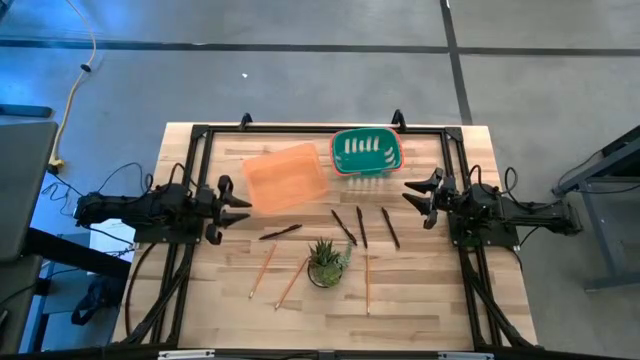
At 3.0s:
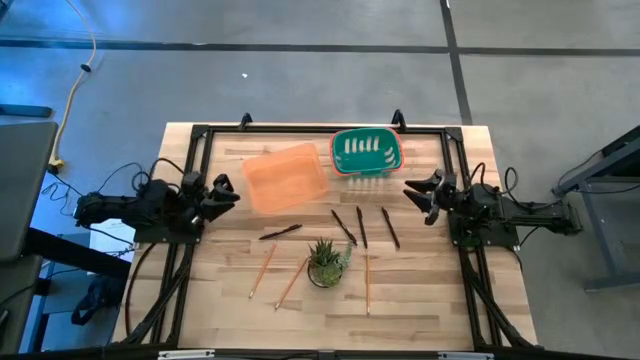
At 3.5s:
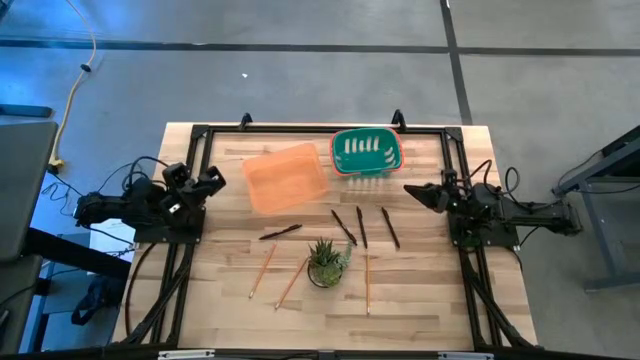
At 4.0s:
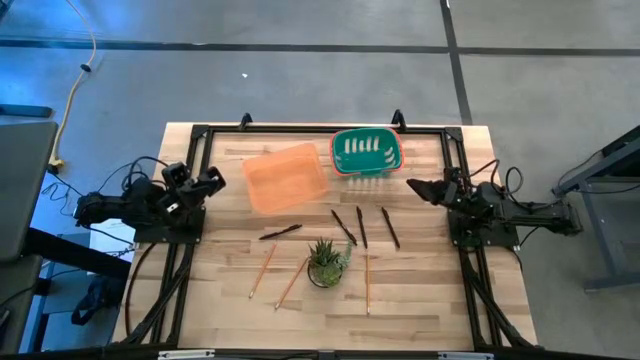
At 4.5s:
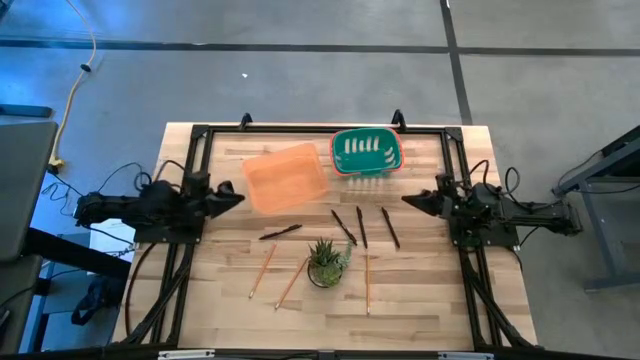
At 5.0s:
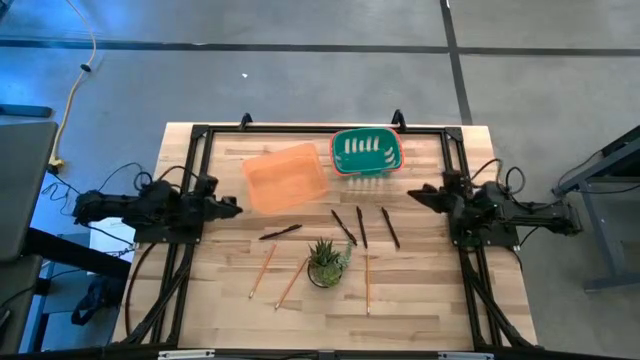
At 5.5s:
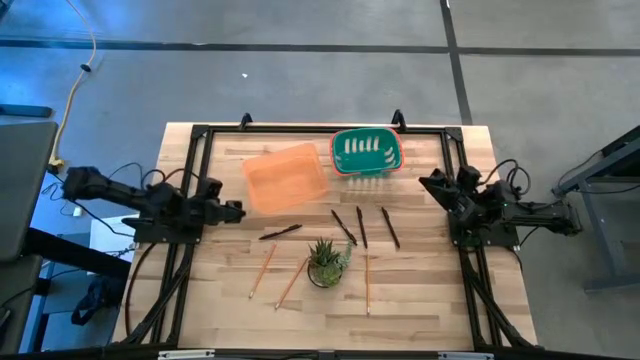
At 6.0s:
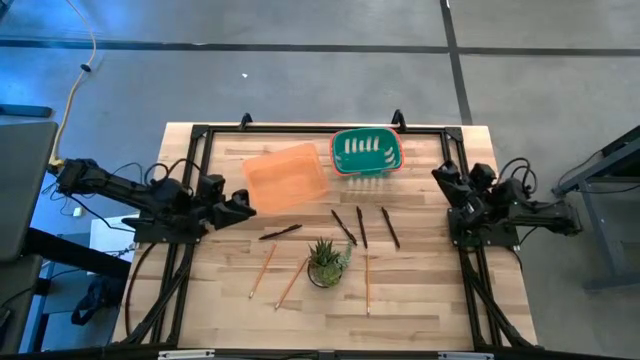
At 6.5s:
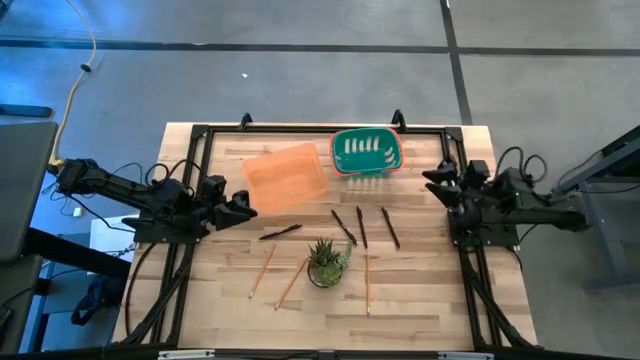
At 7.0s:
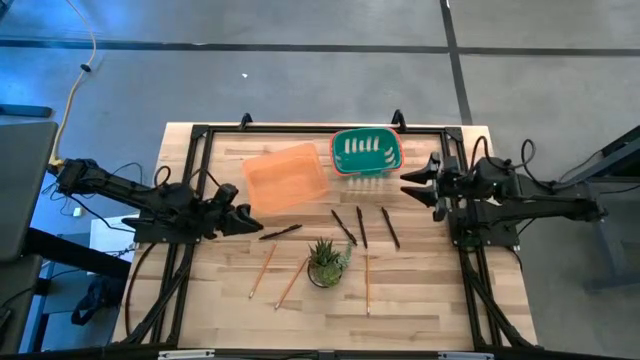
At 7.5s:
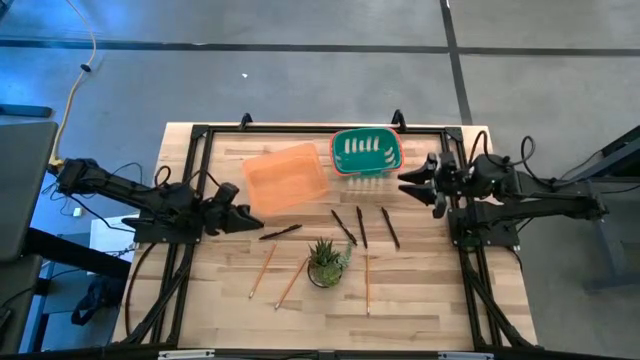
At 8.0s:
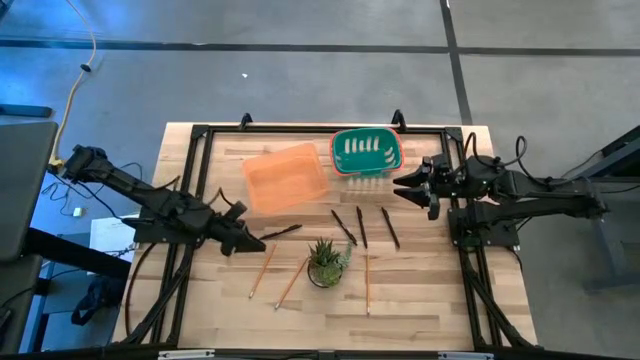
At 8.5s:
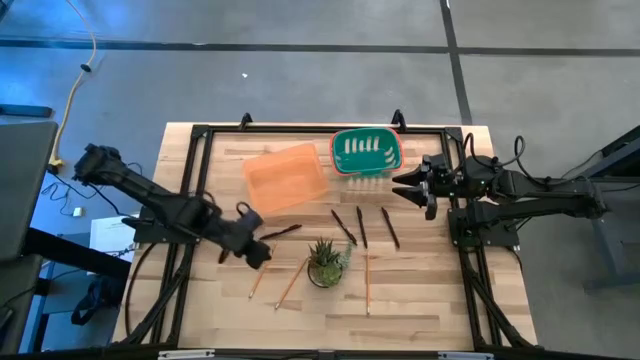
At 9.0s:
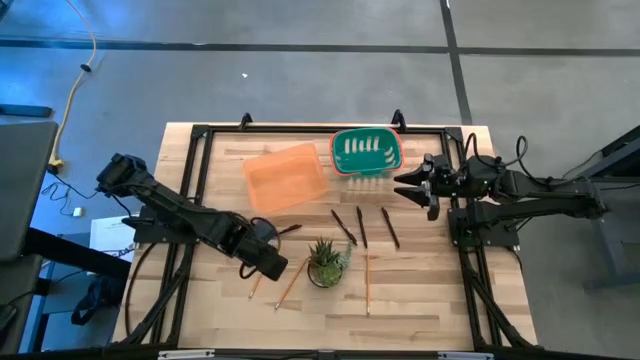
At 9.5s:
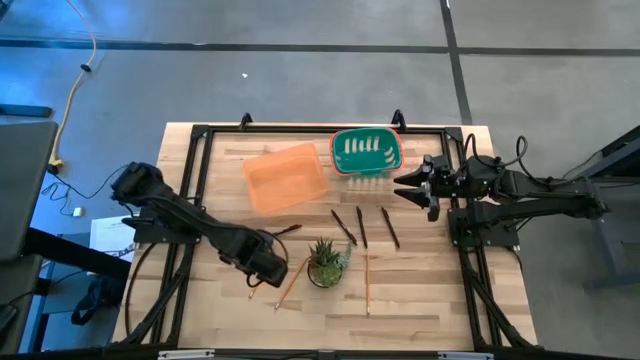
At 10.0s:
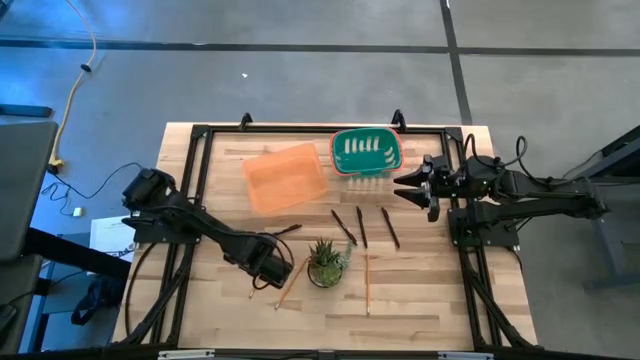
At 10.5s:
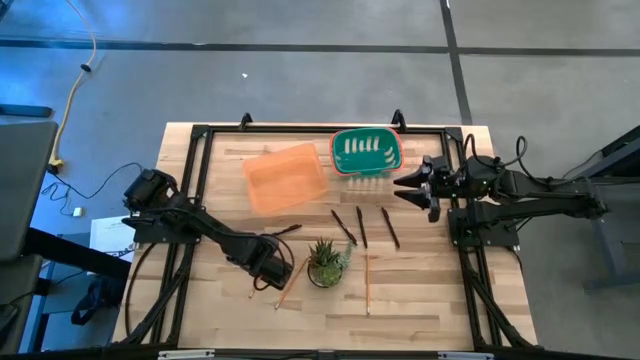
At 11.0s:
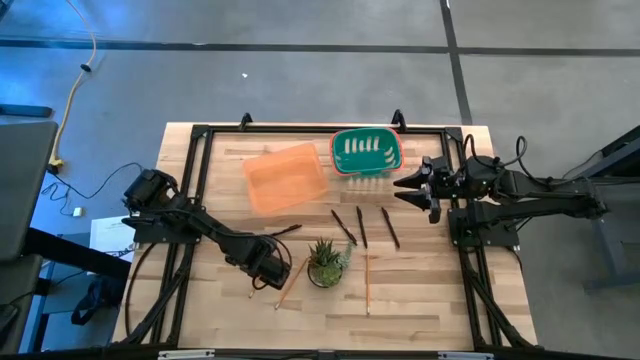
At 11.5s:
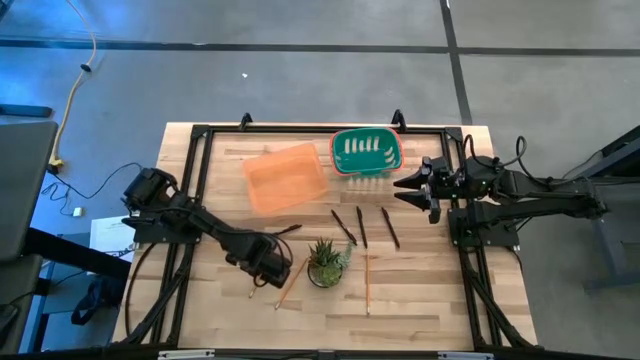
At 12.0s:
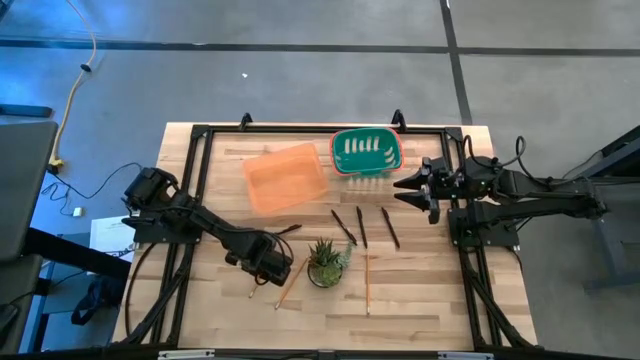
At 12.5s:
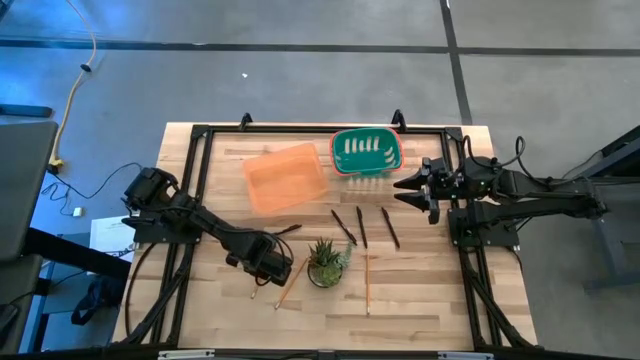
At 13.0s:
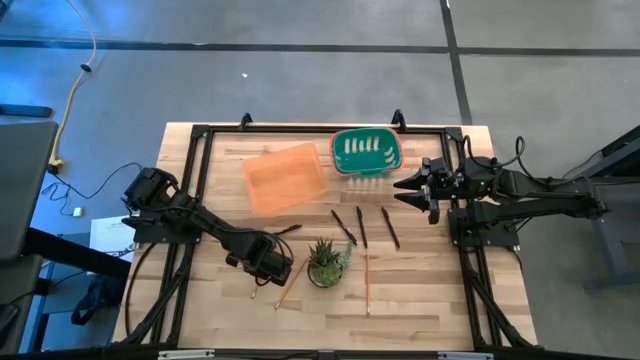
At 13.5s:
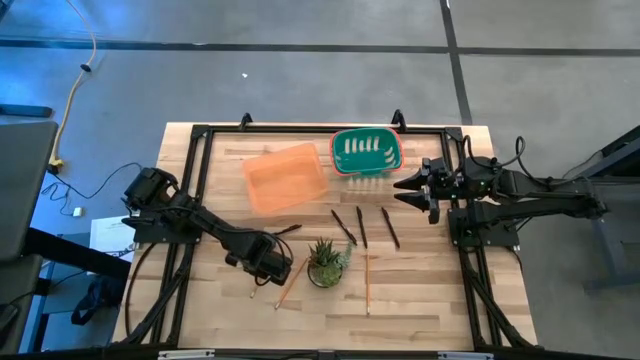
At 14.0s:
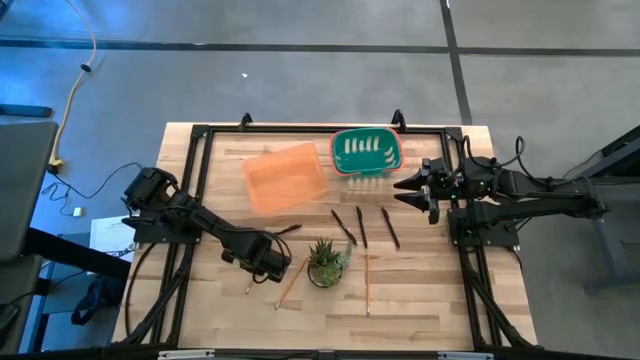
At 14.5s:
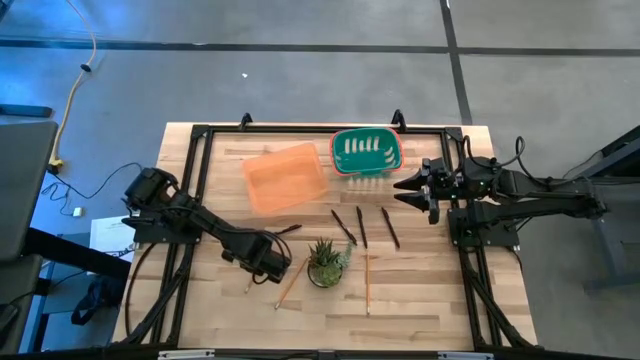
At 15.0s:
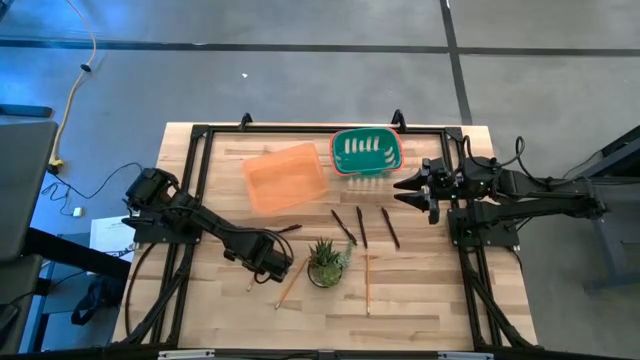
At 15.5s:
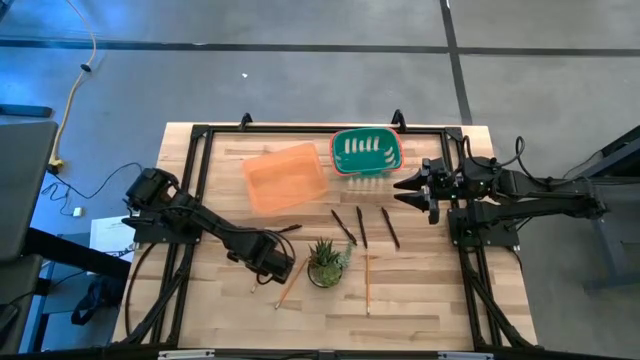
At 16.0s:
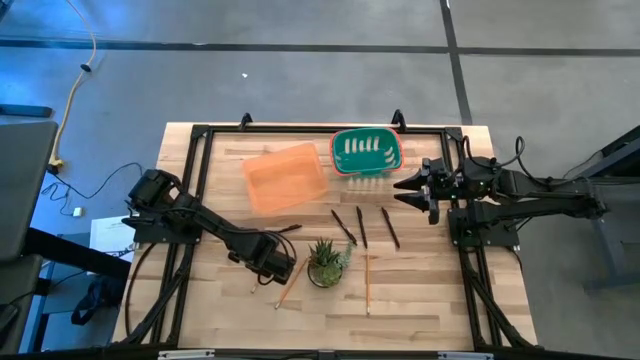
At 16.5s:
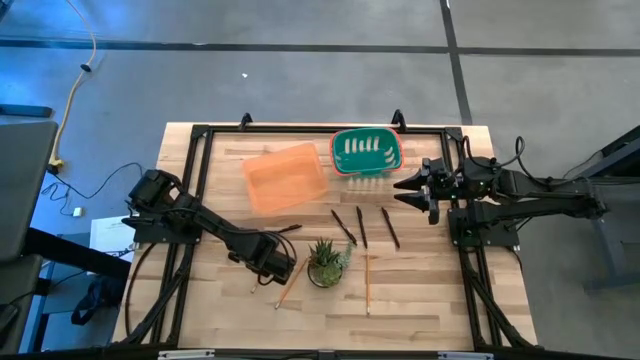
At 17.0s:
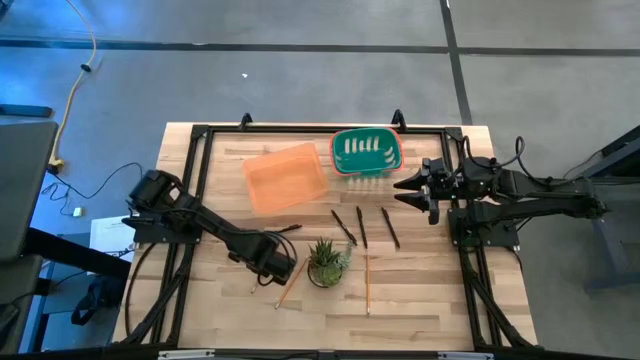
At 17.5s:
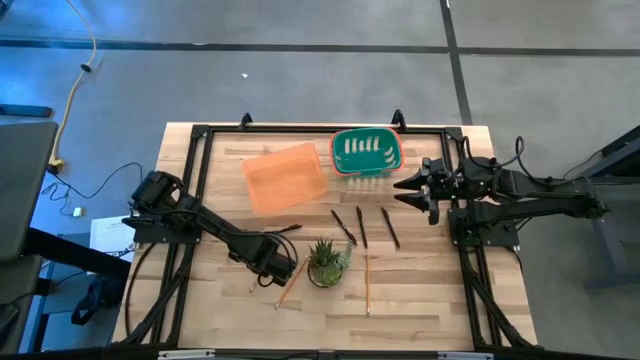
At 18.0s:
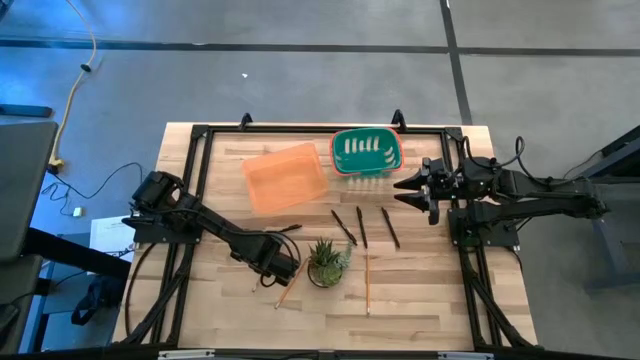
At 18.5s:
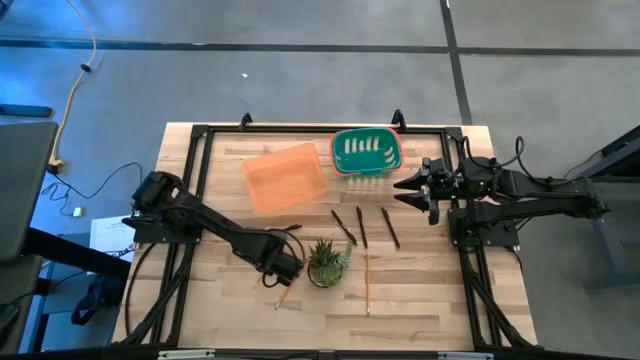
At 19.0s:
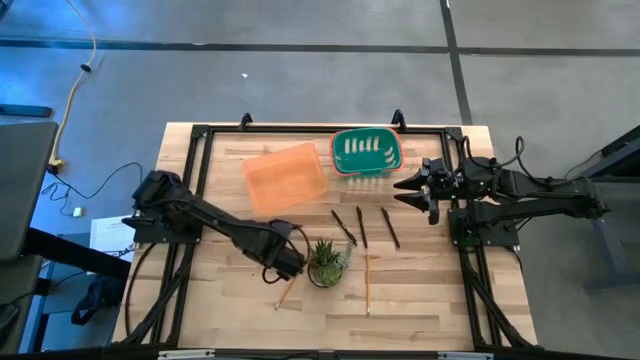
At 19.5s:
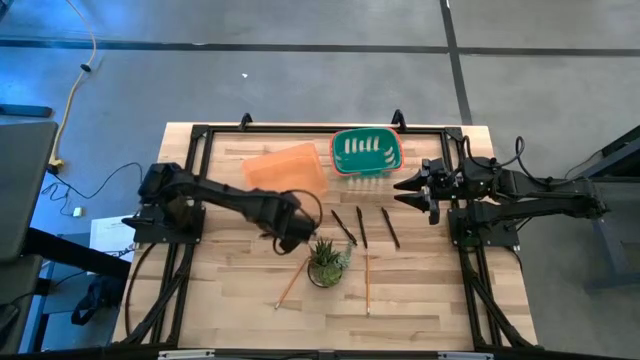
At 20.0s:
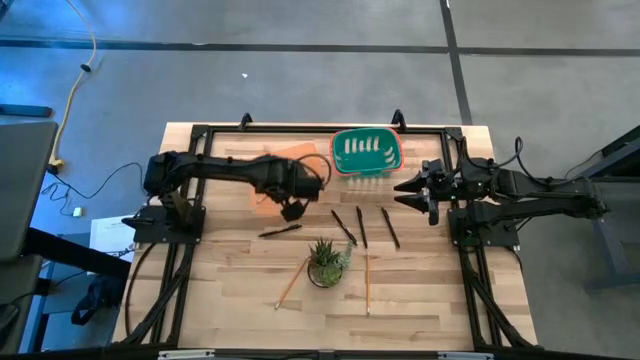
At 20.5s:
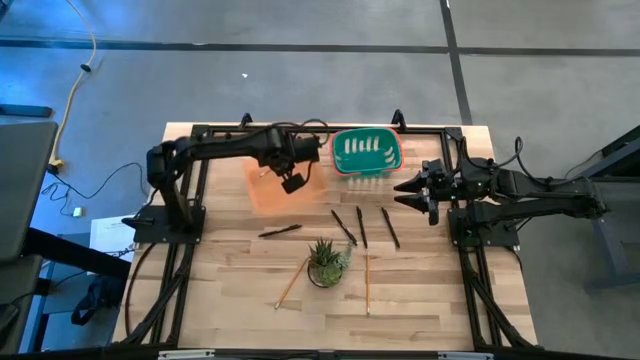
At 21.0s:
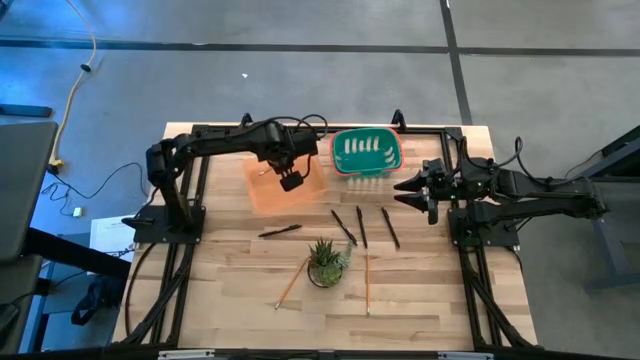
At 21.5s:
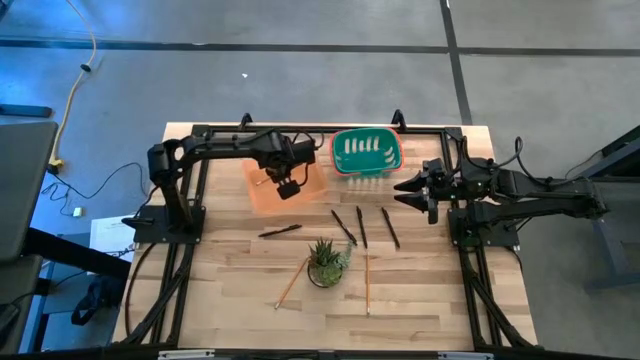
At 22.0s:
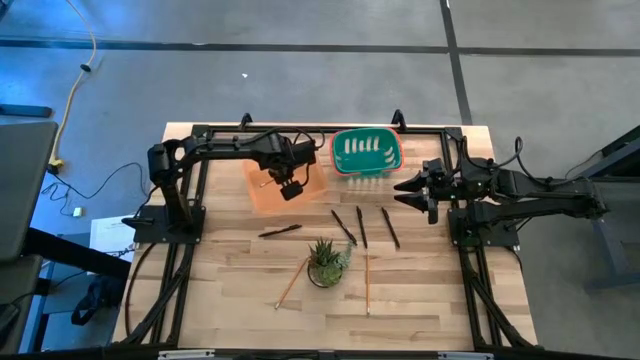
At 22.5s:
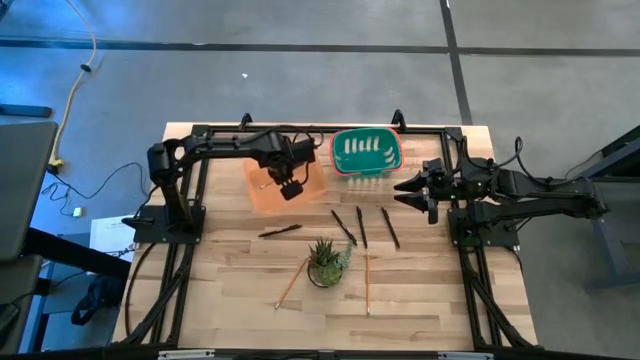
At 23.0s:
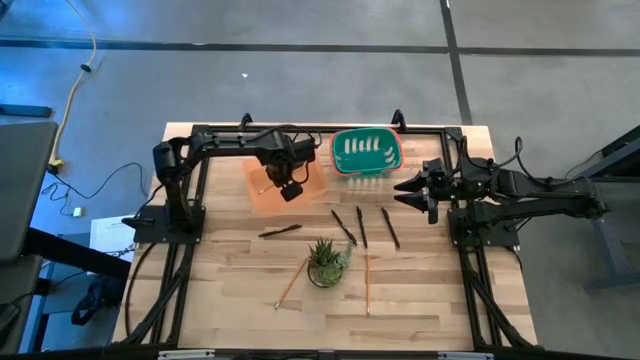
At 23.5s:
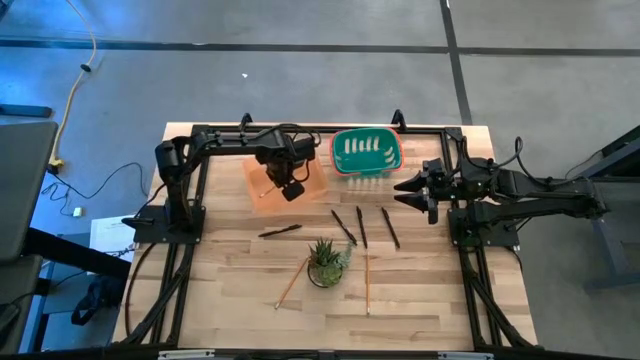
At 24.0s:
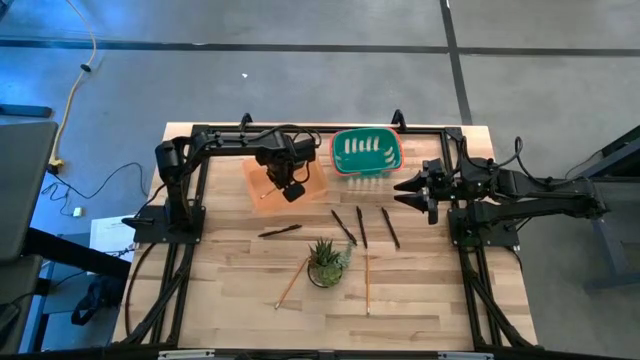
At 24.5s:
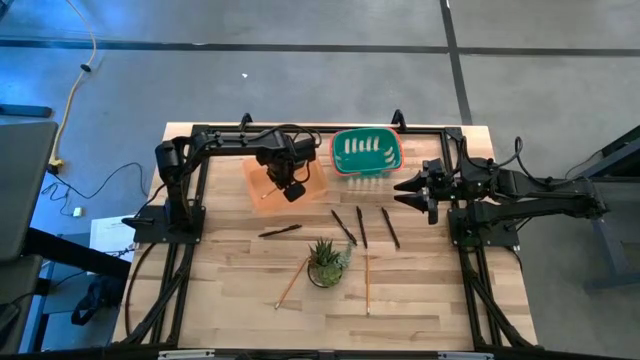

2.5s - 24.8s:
Task: Sort pens & pencils
Put the orange pencil into the orange bin
